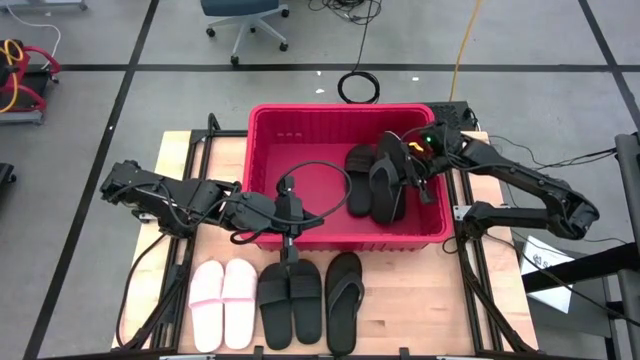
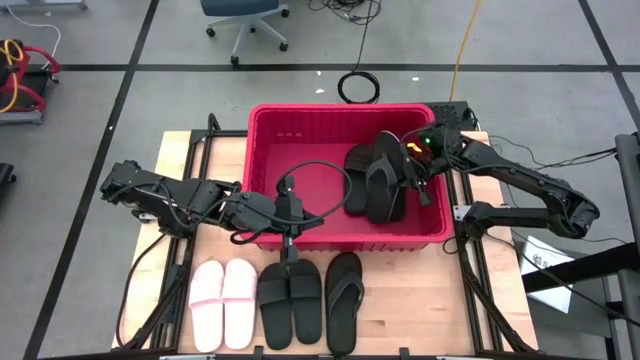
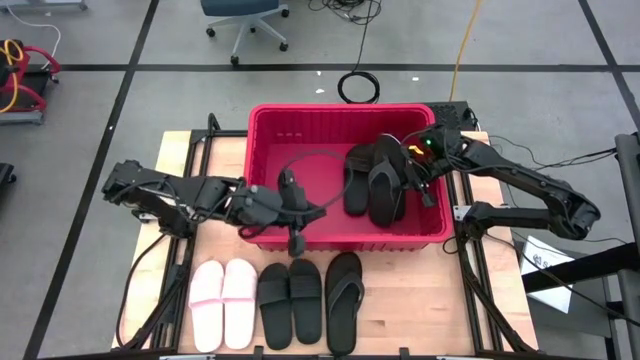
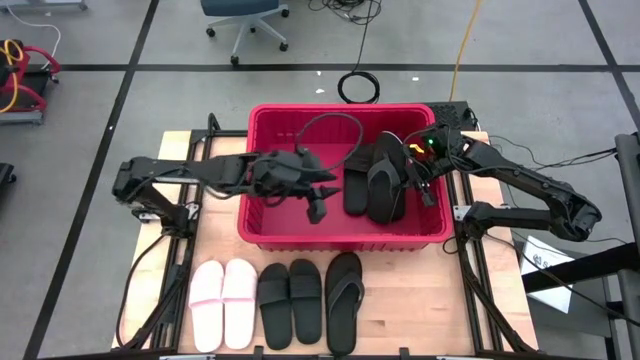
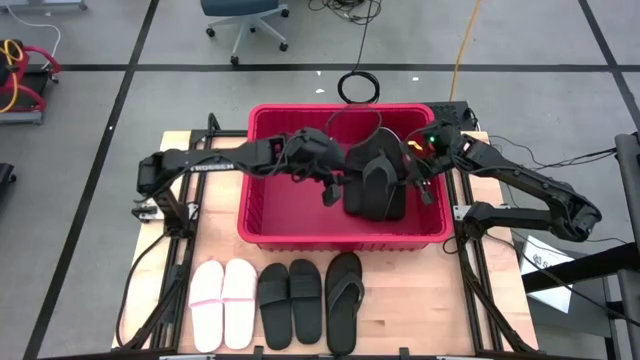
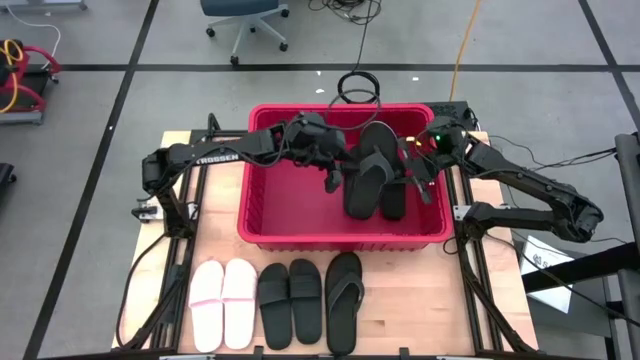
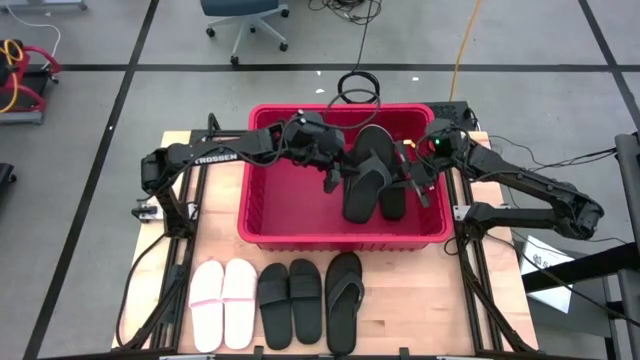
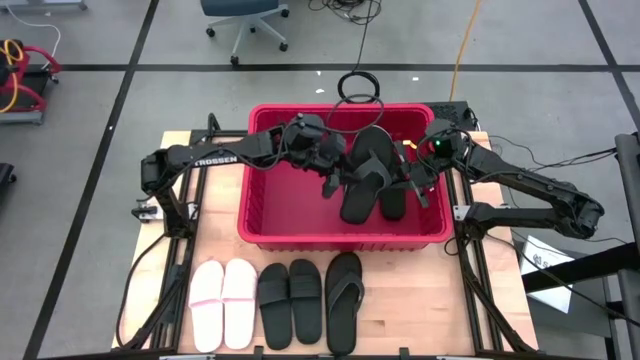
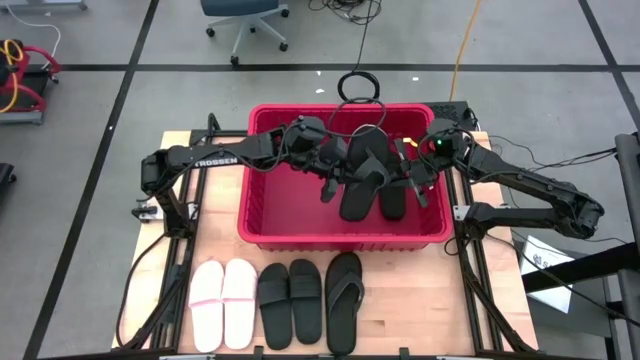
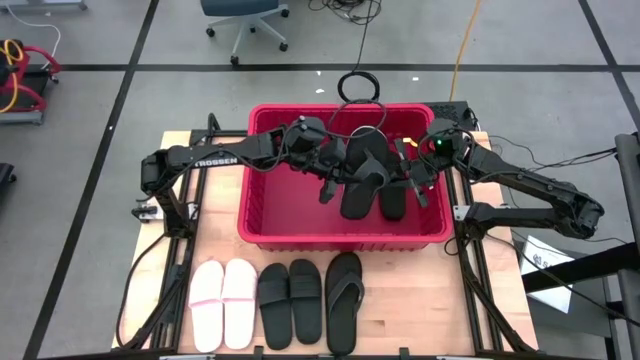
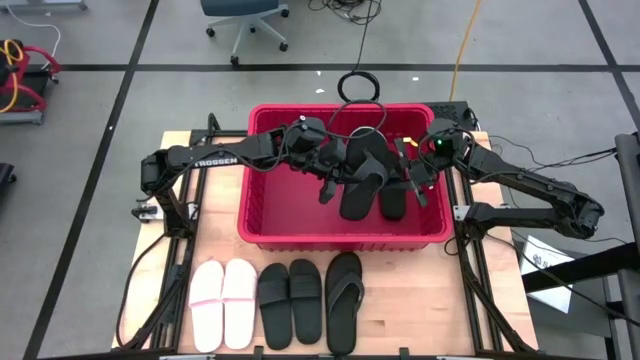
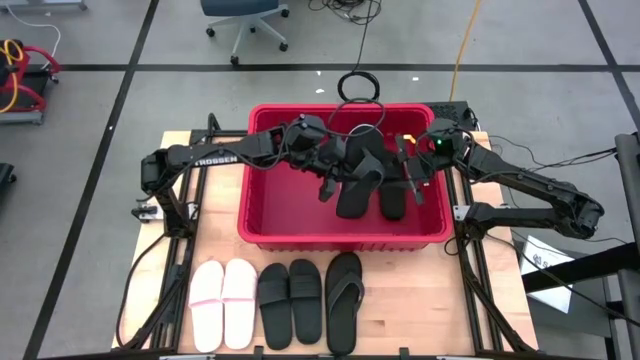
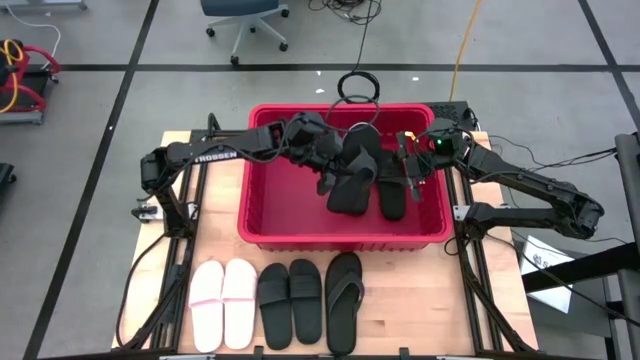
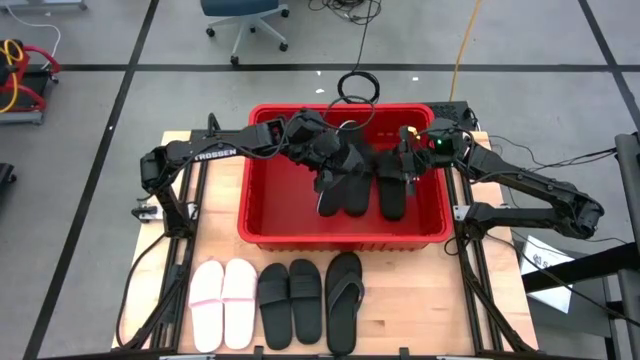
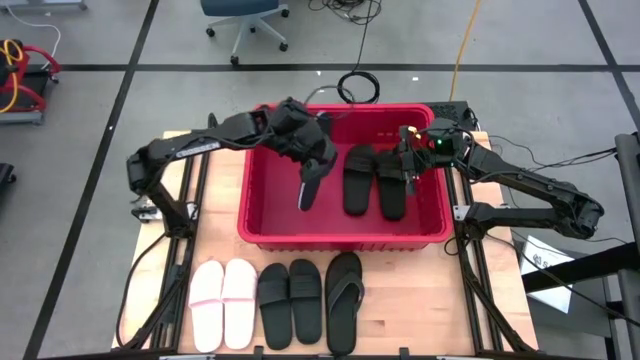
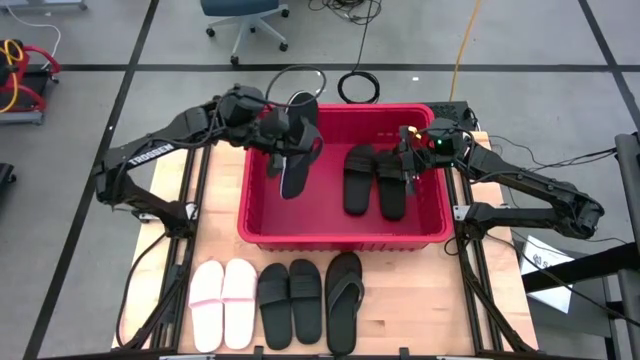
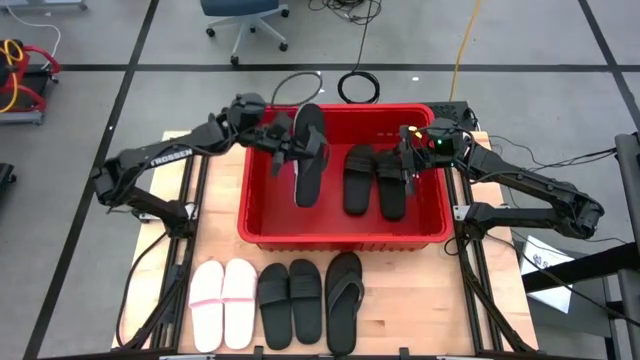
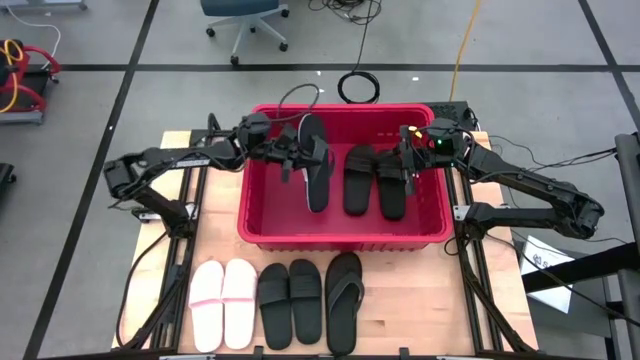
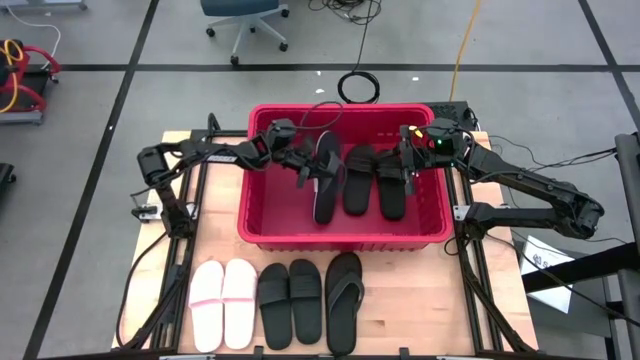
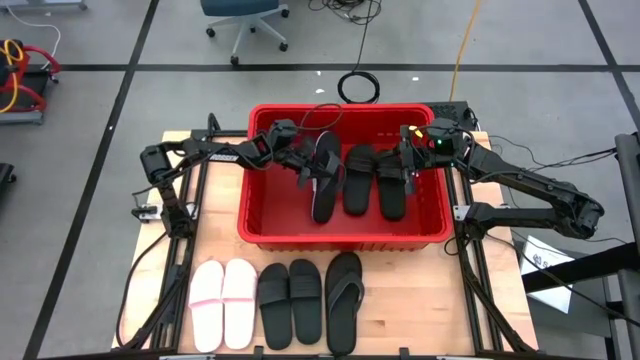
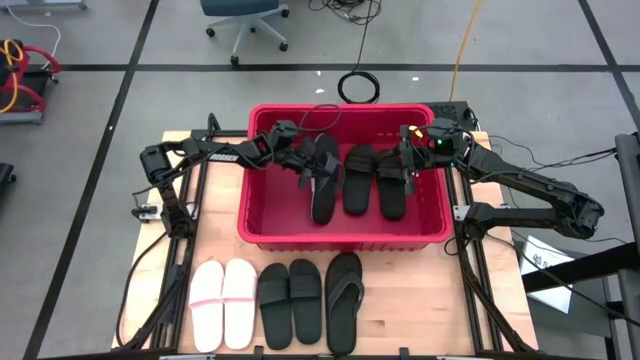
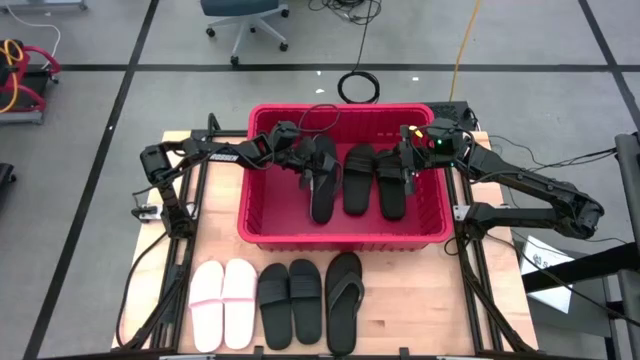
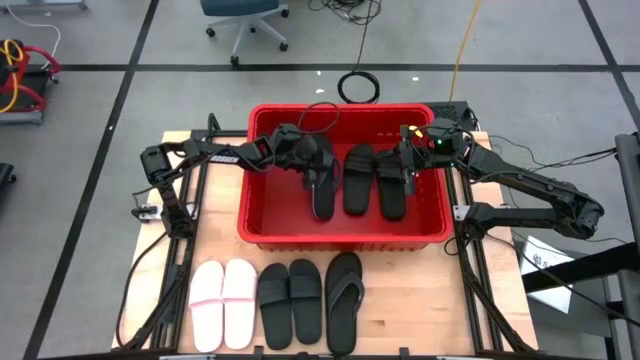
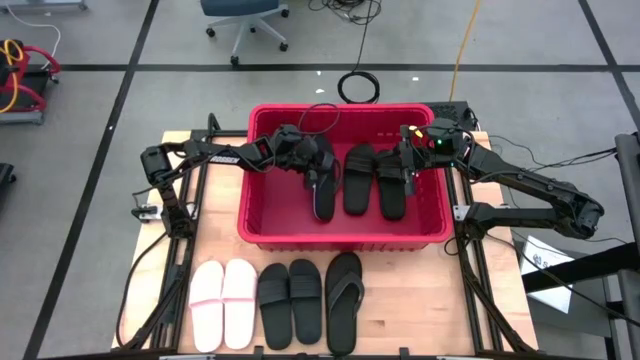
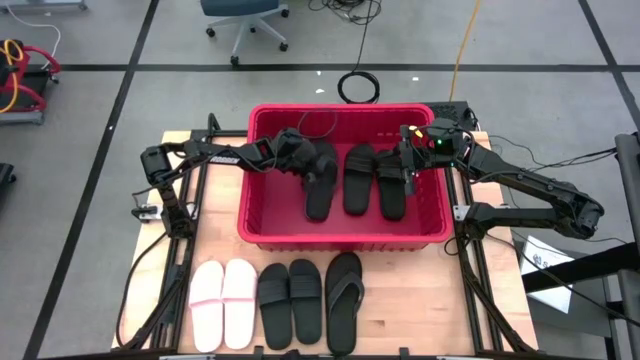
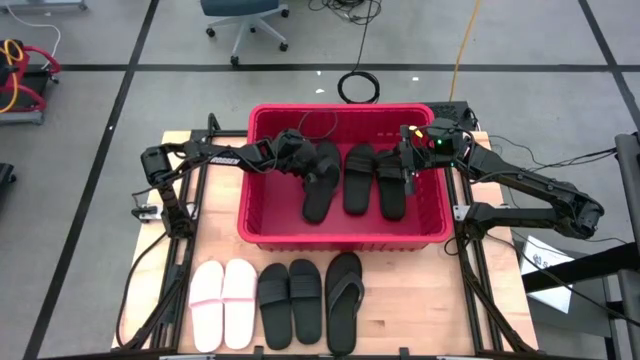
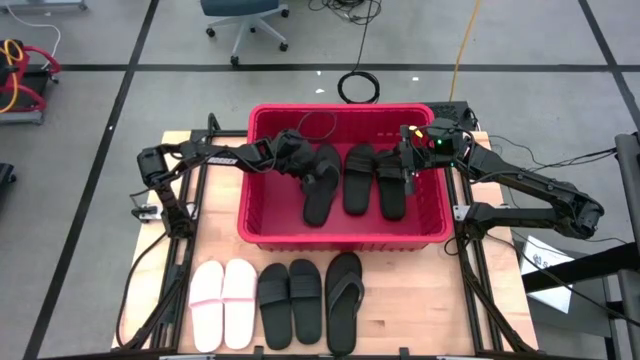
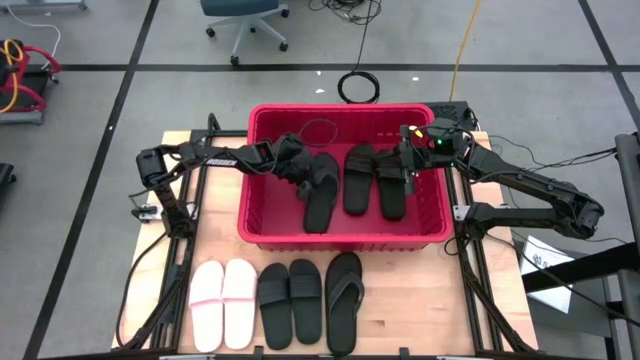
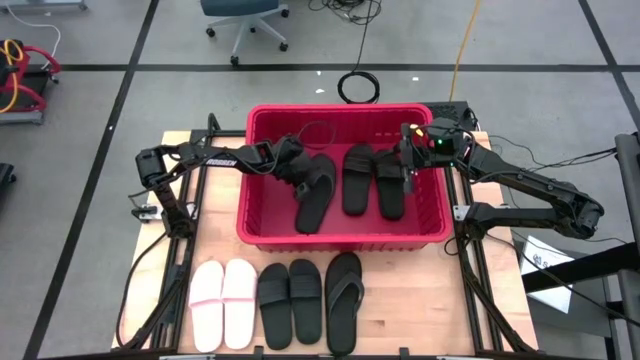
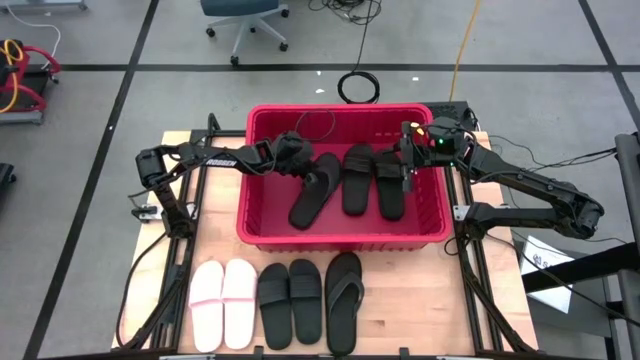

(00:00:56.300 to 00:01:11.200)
Task: Pick and place slides into bin
Put the black slipper into the red bin
